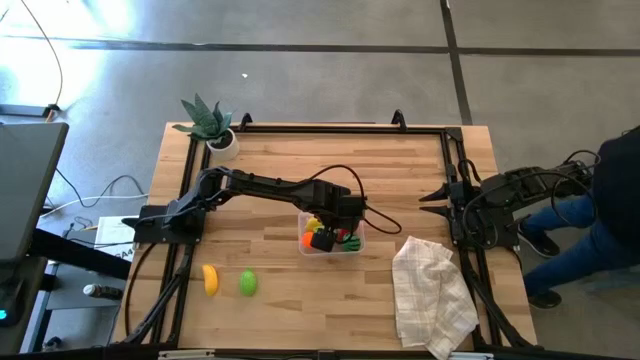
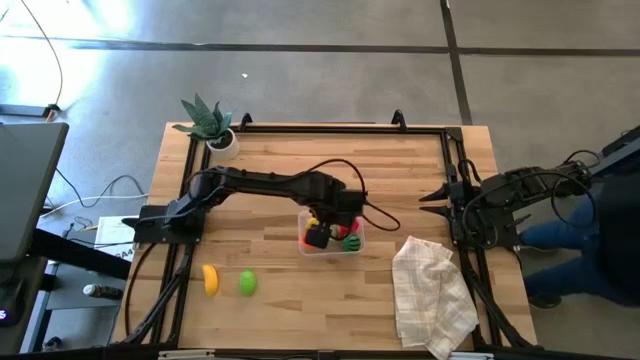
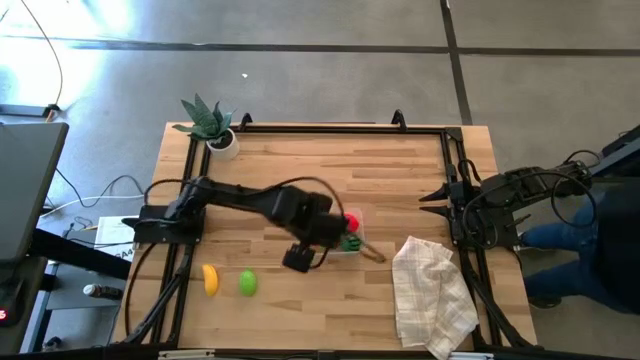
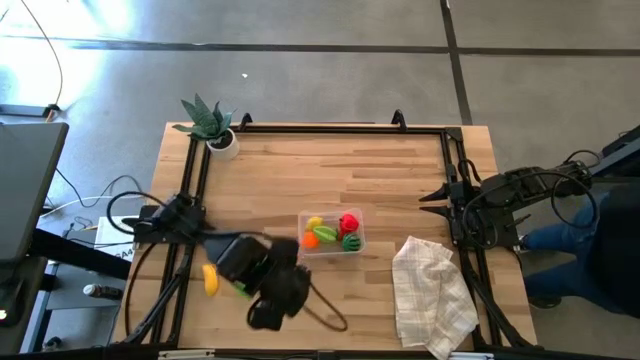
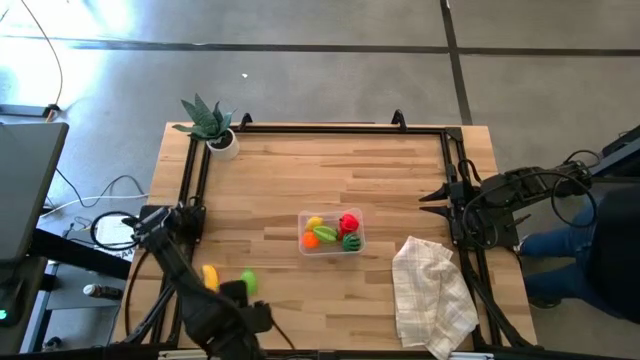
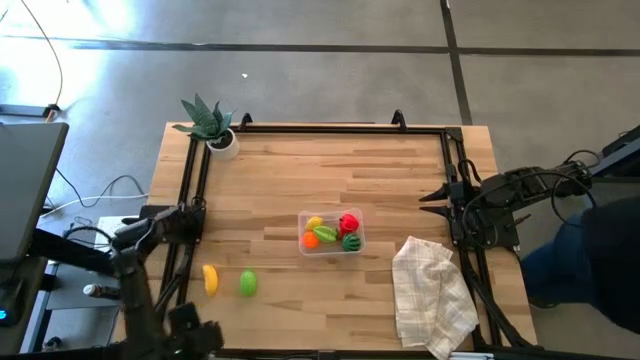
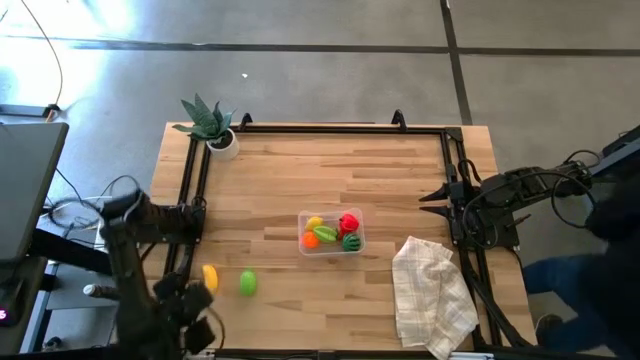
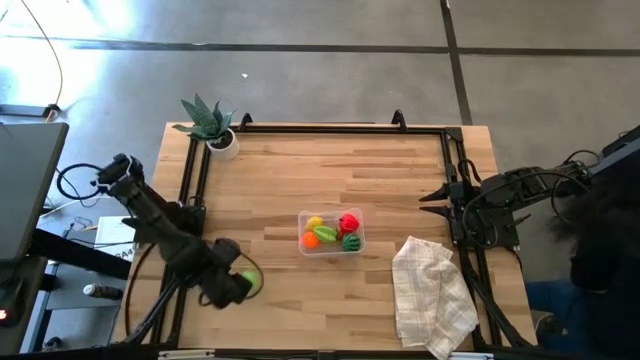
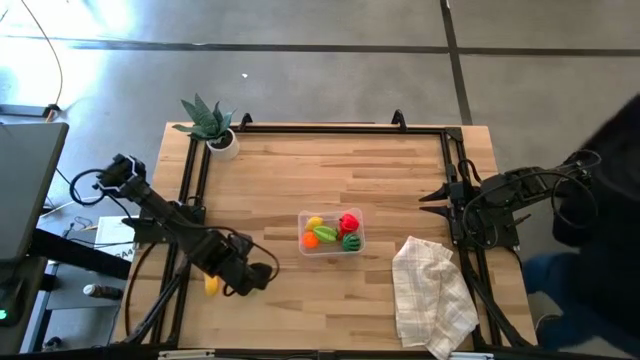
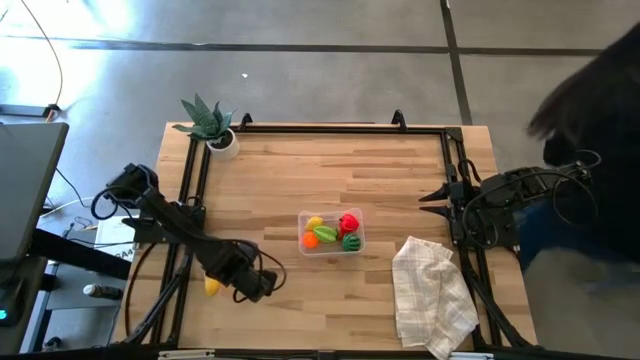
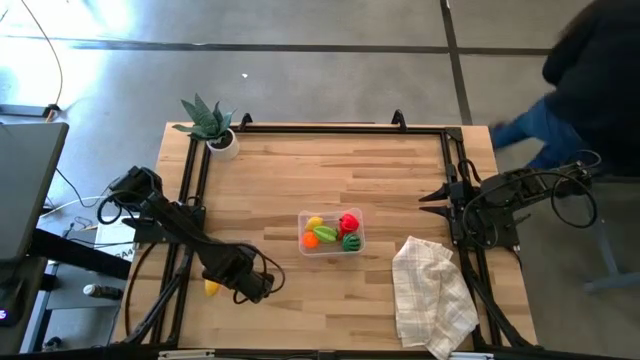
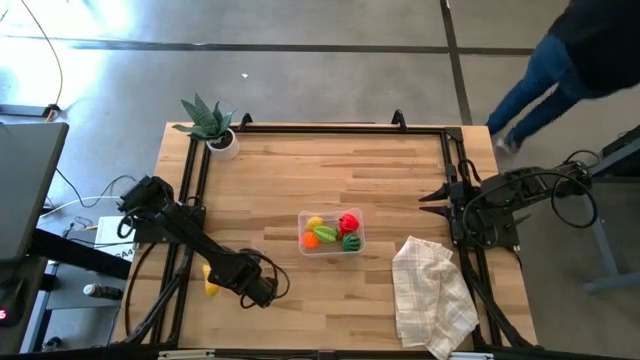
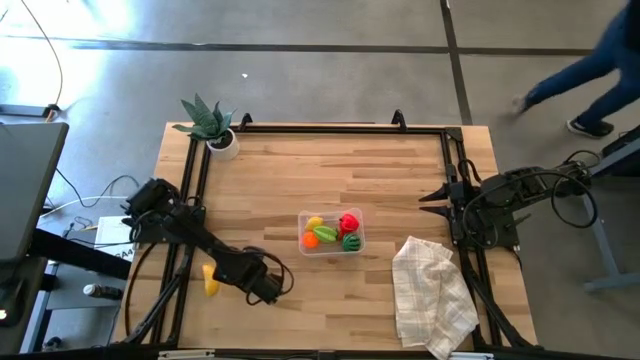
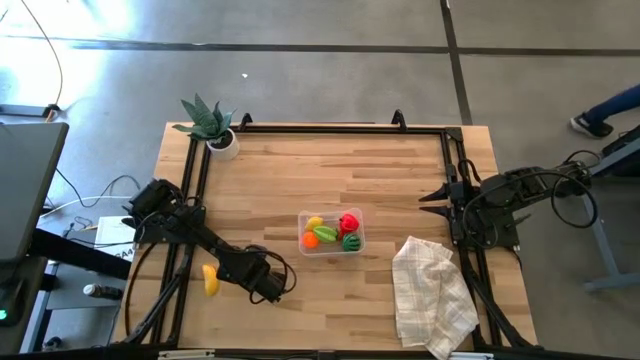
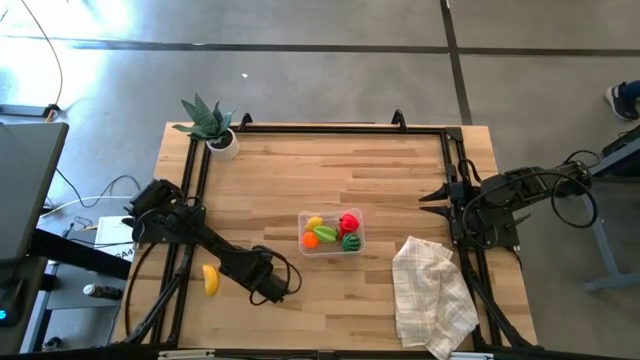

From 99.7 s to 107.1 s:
Task: Pick and placing Produce into tupperware
Put the green melon into the transparent bin

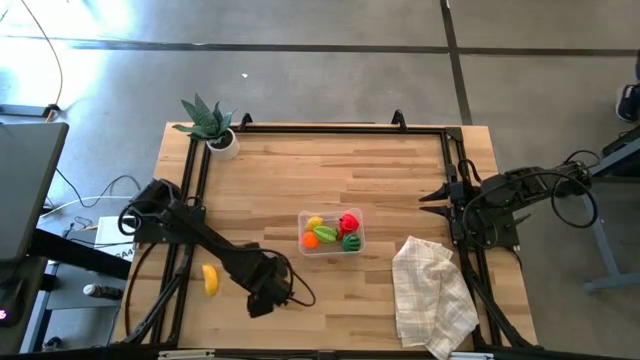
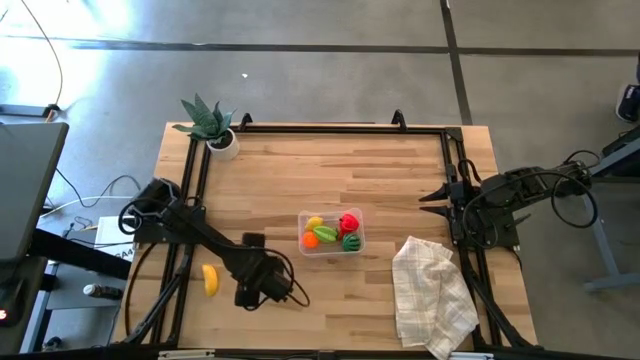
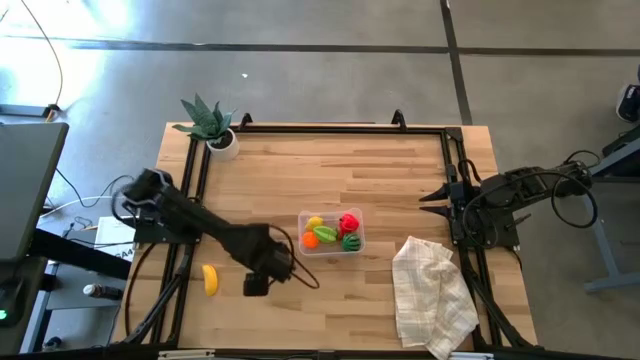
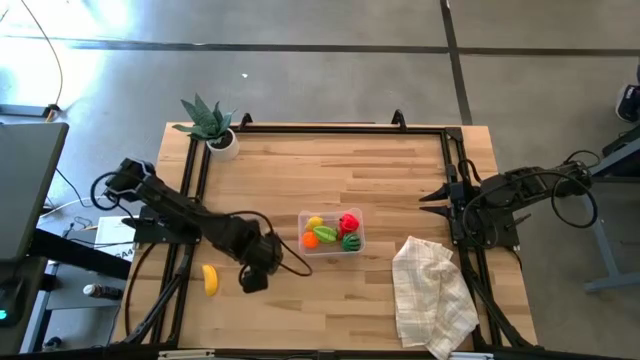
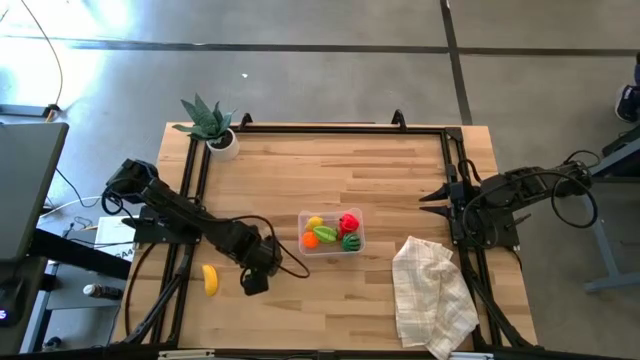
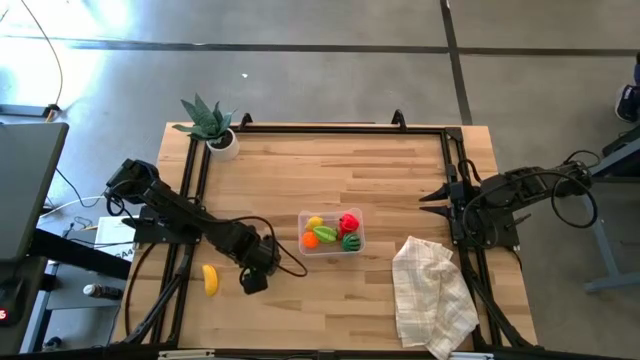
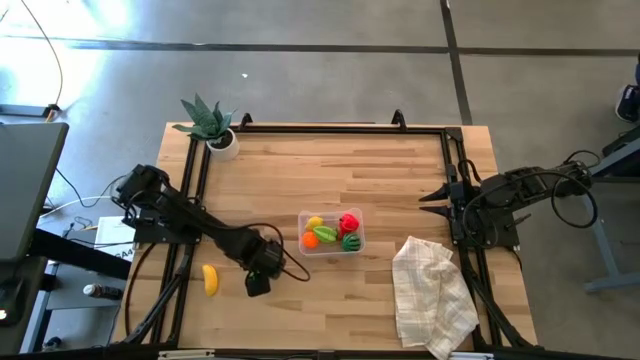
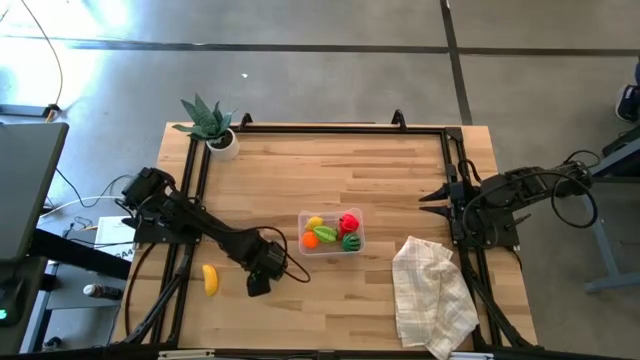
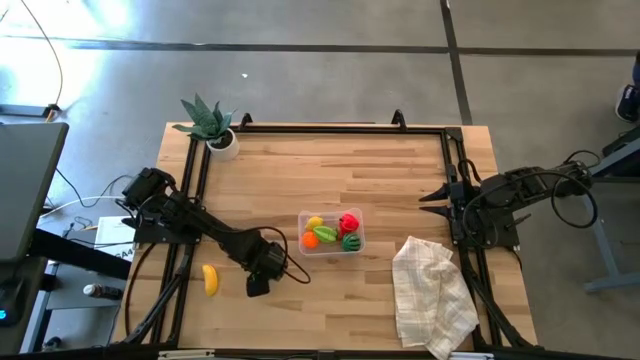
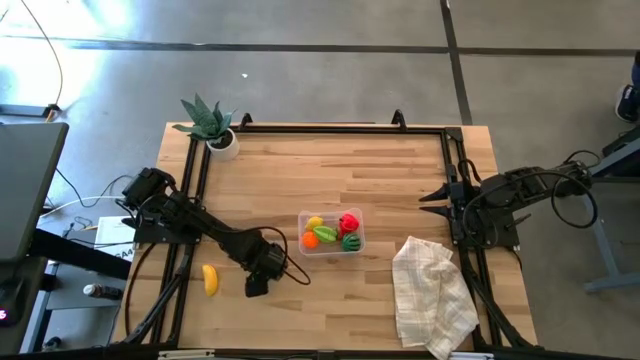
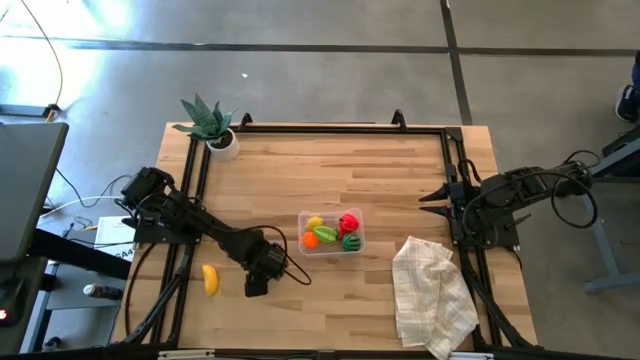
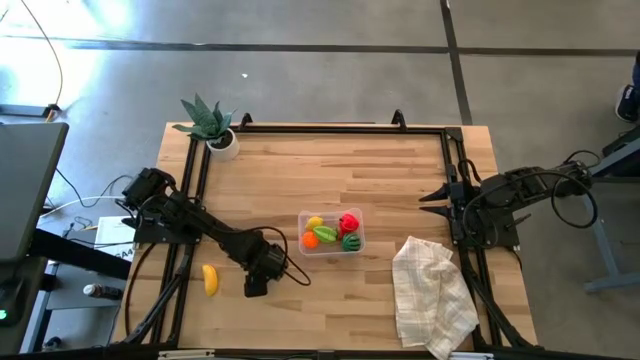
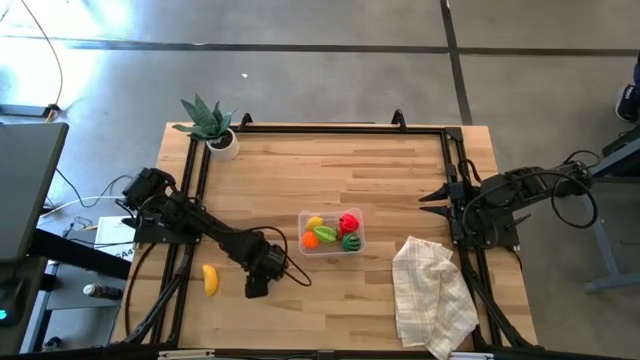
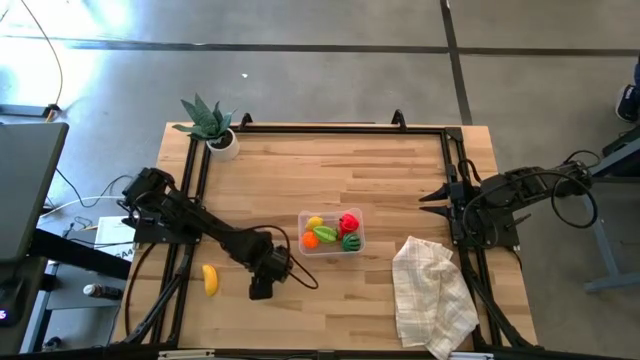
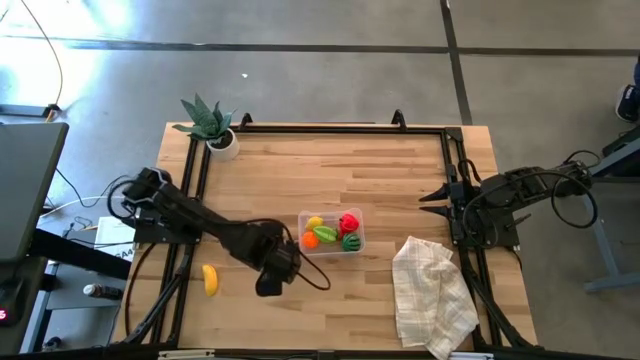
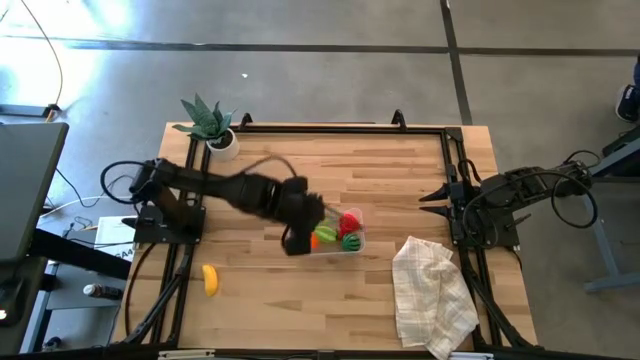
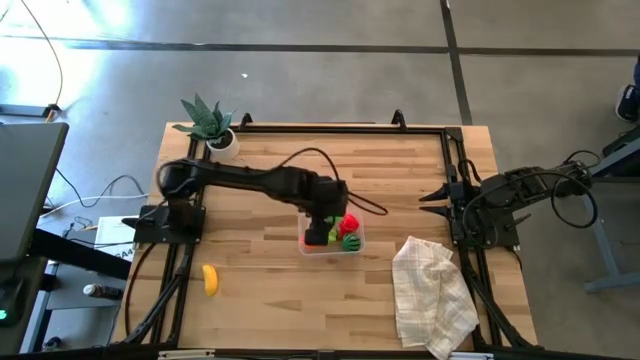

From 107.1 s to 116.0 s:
Put the green melon into the transparent bin

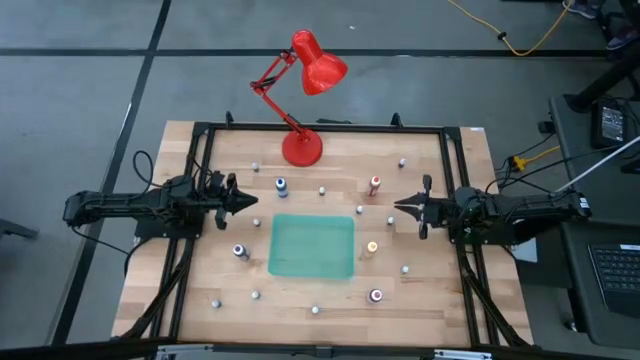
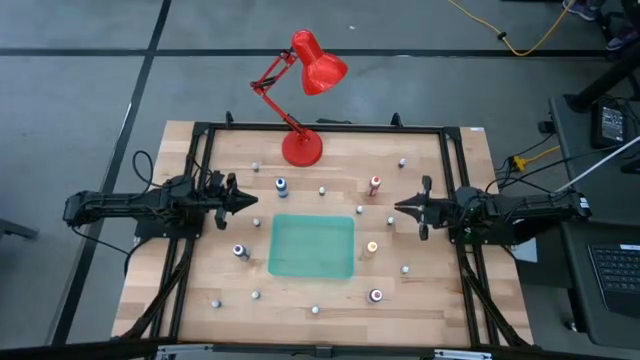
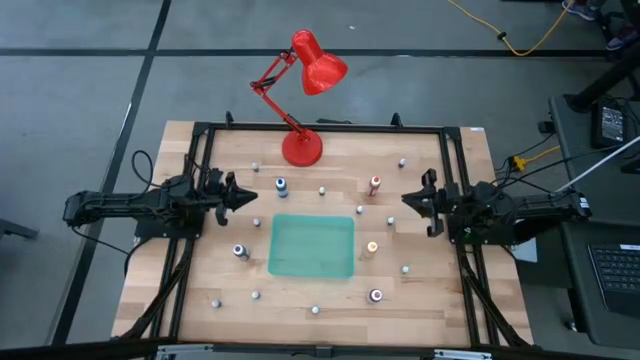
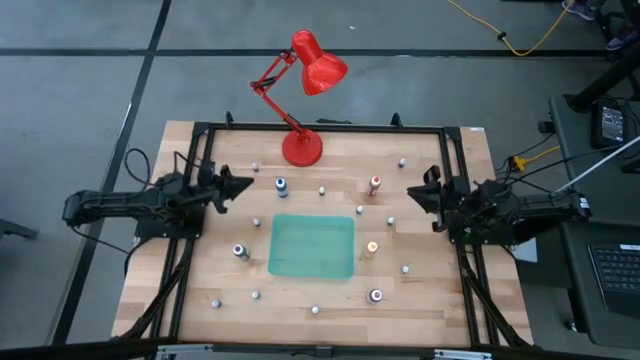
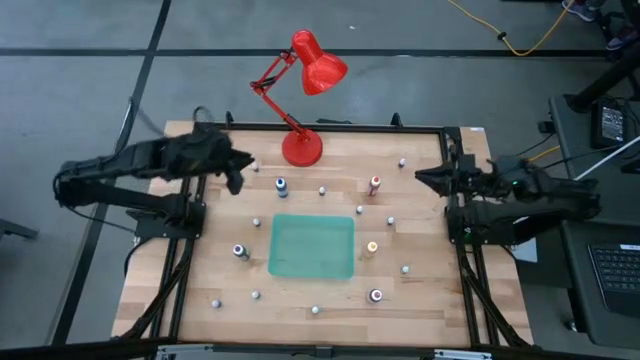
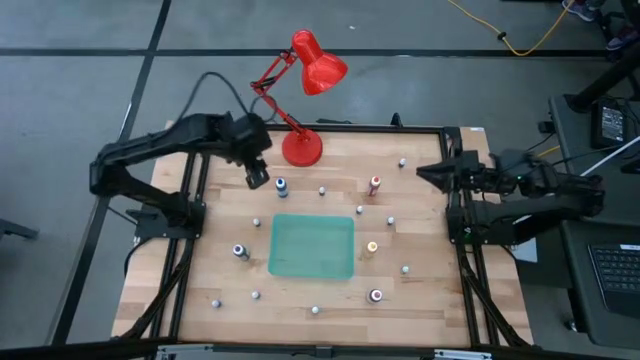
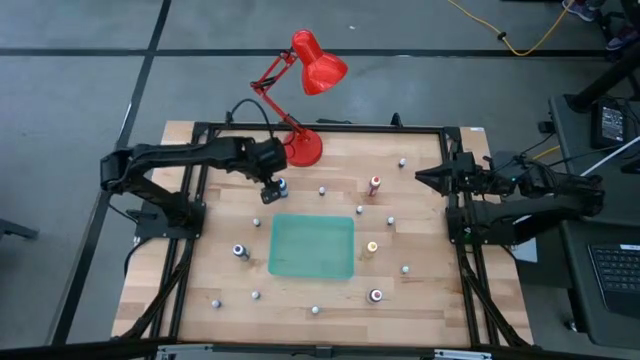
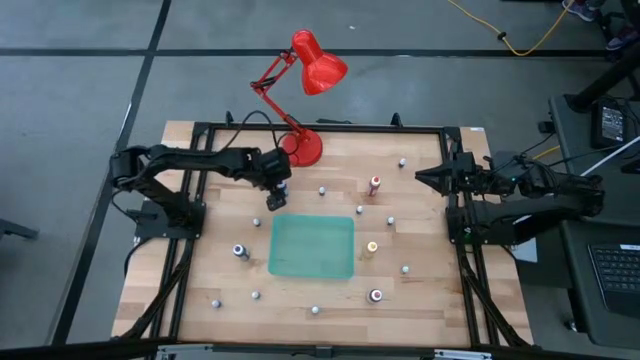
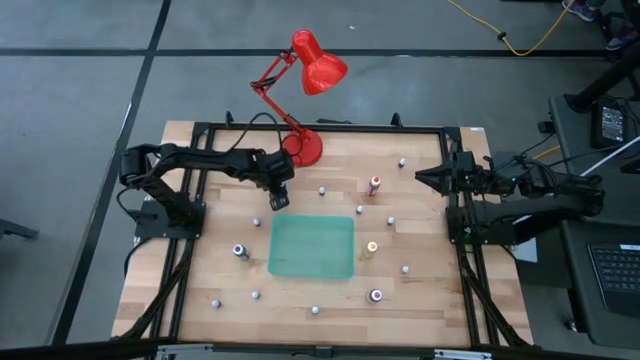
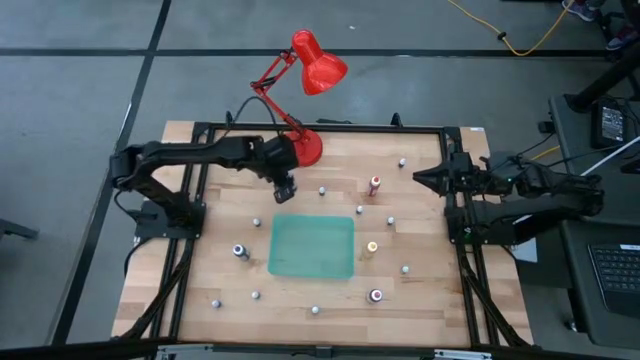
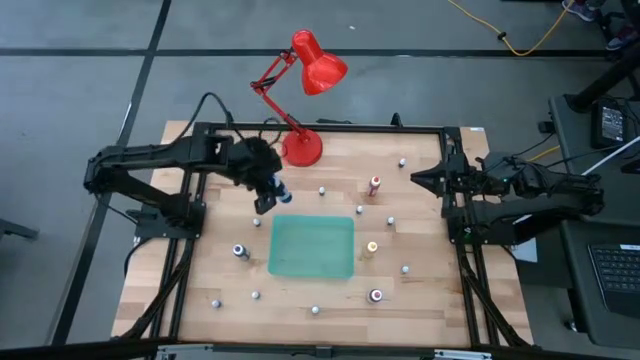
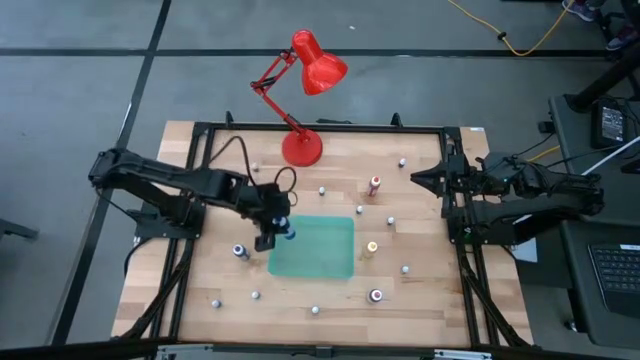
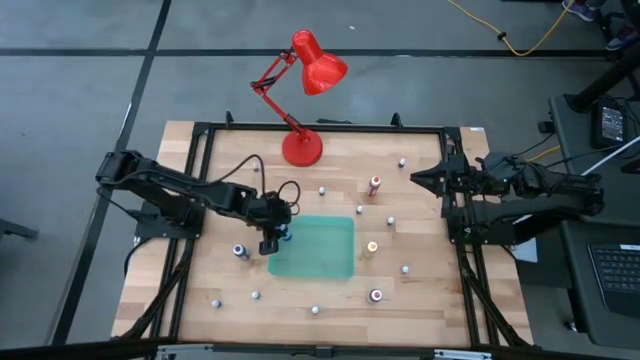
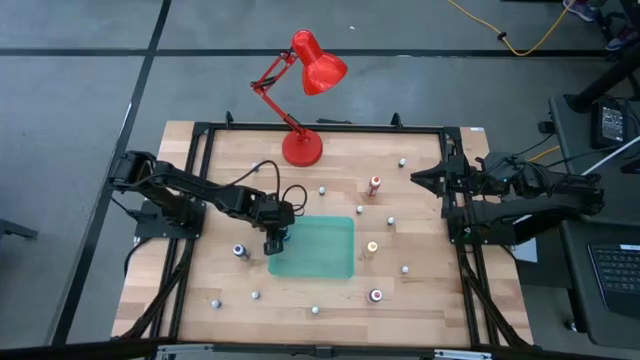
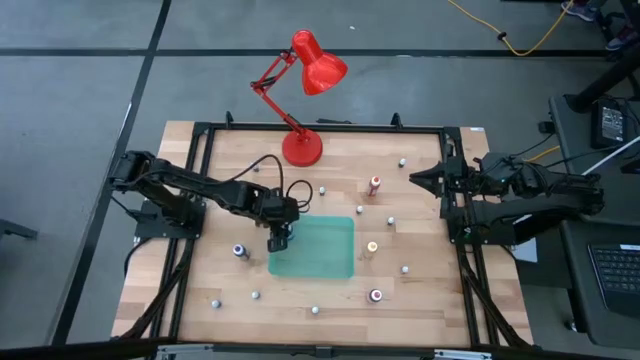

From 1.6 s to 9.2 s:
Task: Pick & Place food coloring
Put the large blue bottle into the green bin
